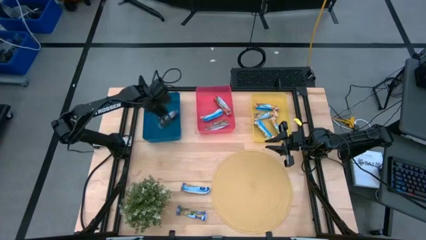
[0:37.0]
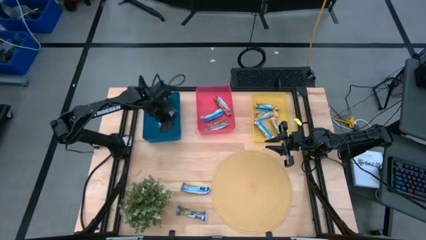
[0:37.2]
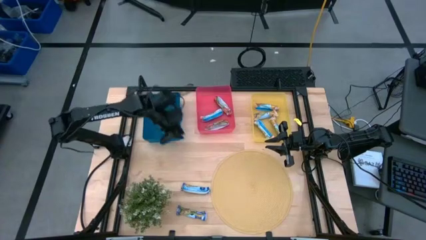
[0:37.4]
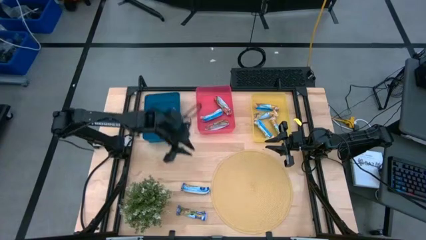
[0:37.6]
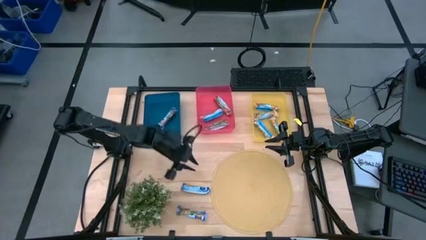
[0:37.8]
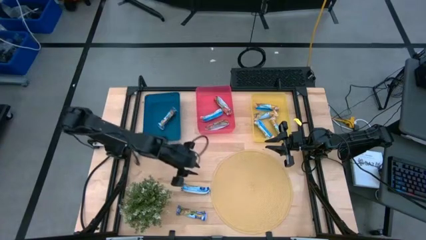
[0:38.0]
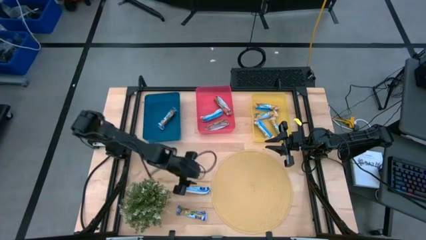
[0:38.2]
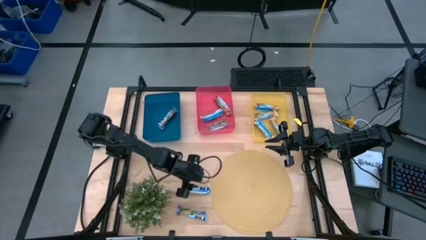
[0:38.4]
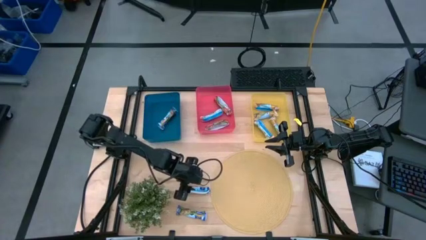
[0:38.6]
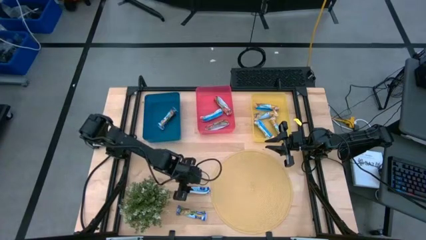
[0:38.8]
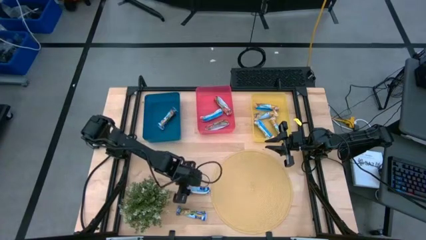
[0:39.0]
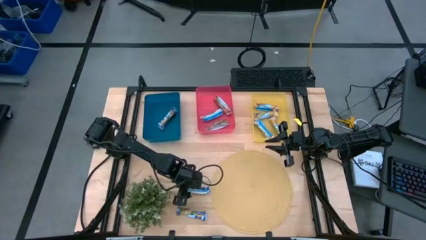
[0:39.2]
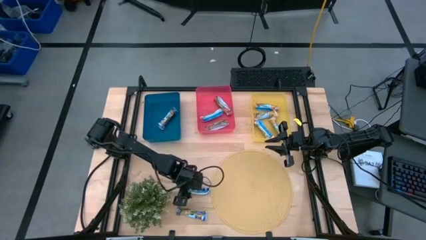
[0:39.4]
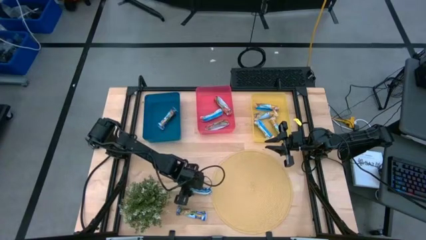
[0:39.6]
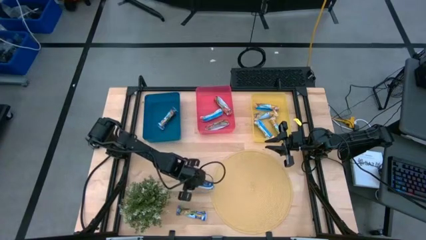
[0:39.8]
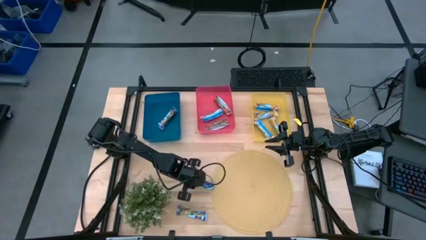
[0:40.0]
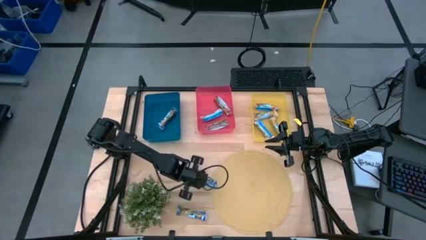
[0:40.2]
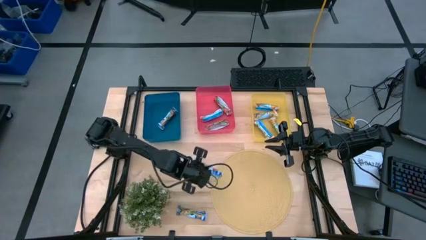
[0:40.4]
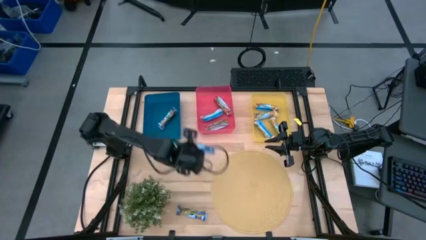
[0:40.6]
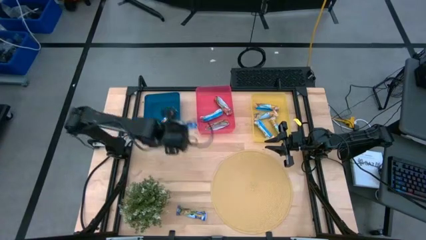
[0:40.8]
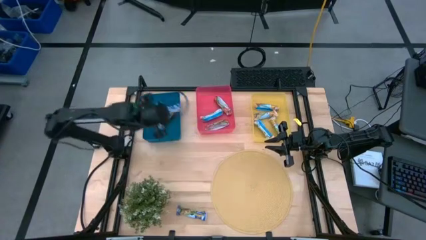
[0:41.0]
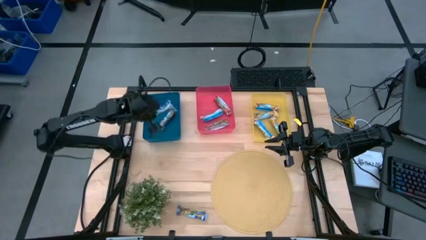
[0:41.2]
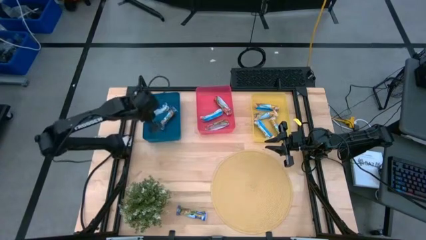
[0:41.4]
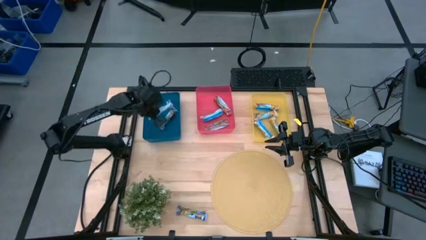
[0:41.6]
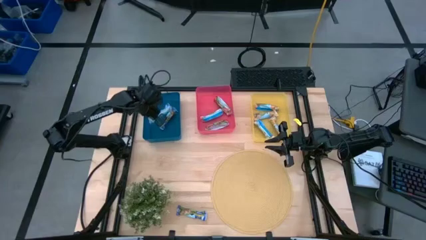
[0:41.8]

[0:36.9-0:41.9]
Task: Pick and place Granola Bars by type
Put the blue granola bar into the blue bin

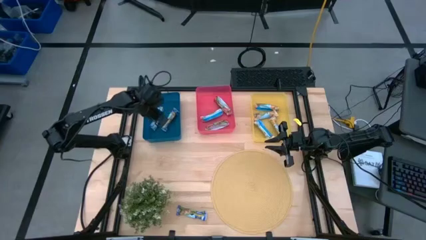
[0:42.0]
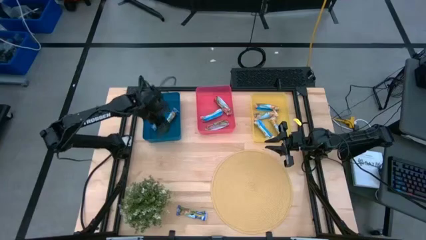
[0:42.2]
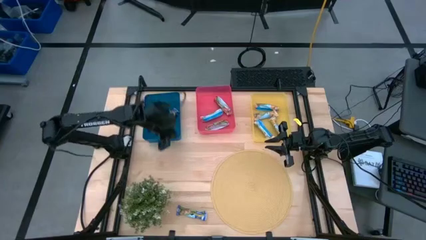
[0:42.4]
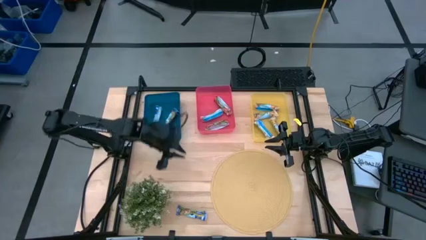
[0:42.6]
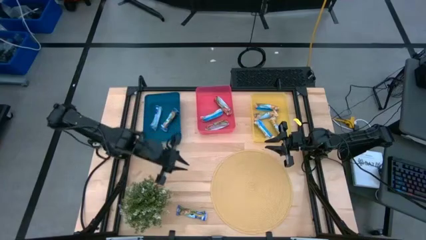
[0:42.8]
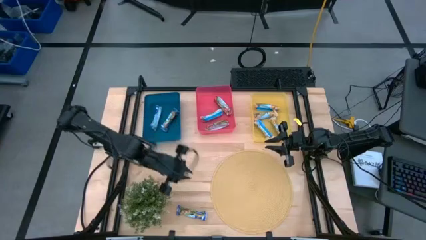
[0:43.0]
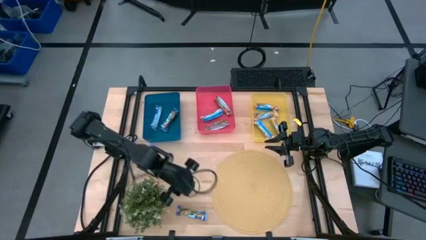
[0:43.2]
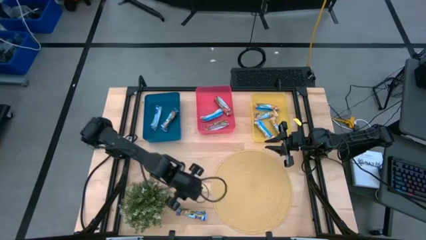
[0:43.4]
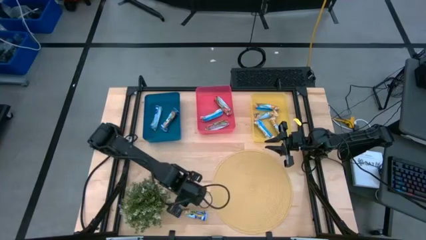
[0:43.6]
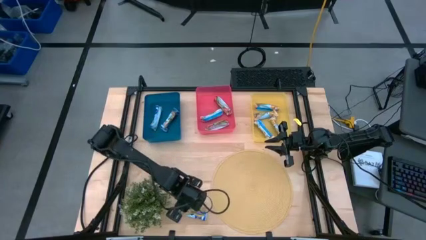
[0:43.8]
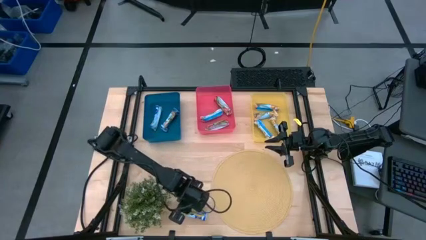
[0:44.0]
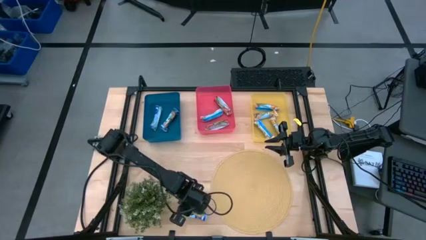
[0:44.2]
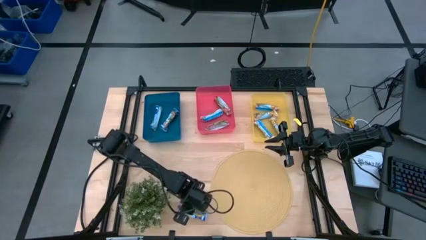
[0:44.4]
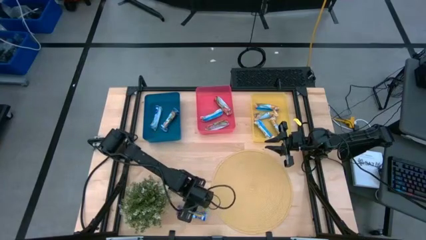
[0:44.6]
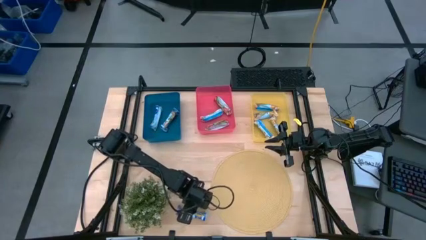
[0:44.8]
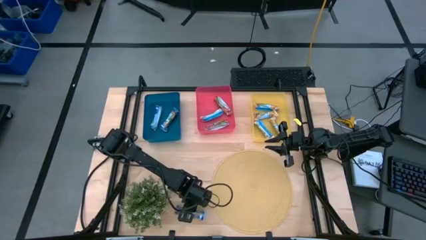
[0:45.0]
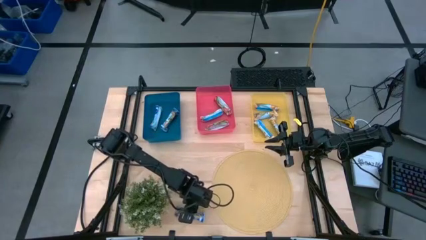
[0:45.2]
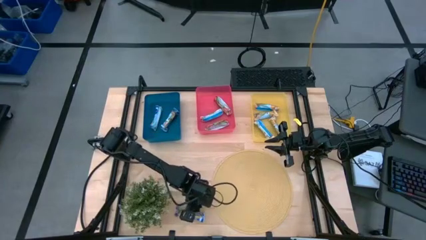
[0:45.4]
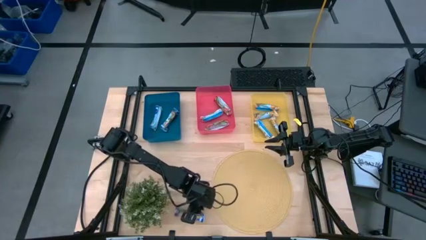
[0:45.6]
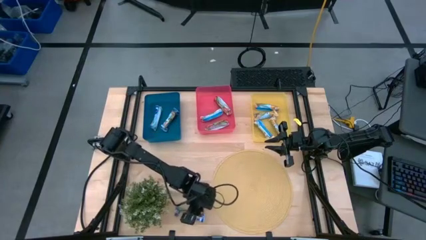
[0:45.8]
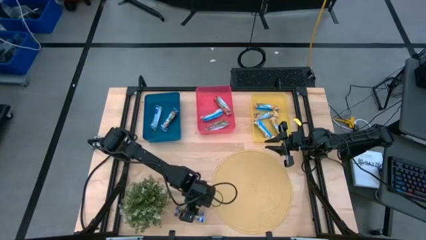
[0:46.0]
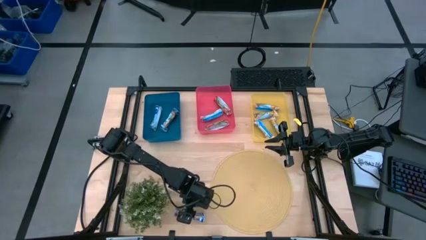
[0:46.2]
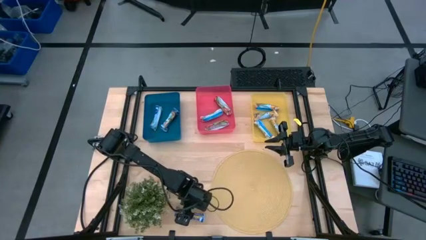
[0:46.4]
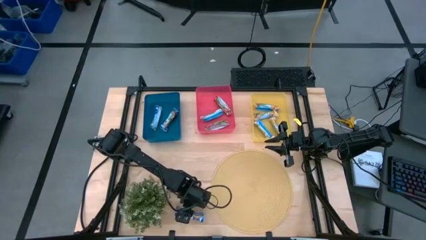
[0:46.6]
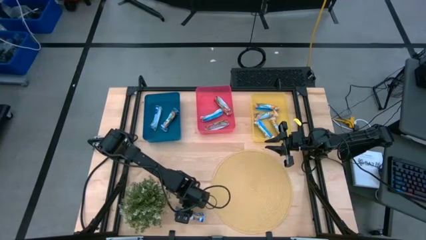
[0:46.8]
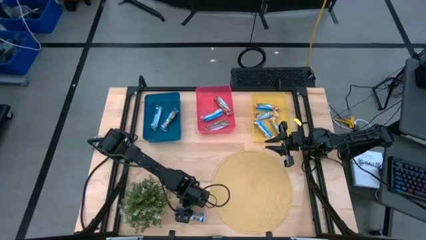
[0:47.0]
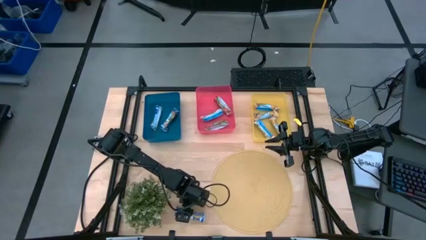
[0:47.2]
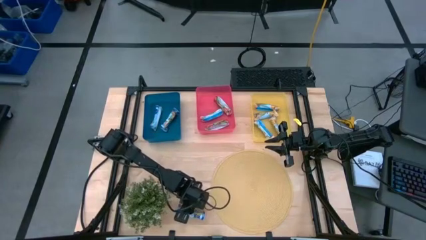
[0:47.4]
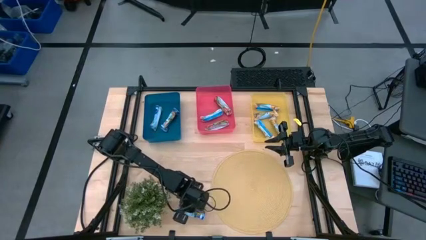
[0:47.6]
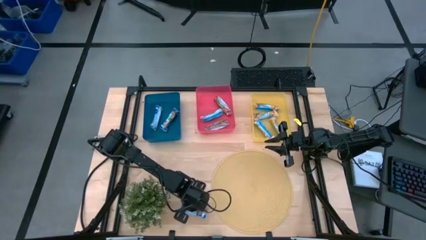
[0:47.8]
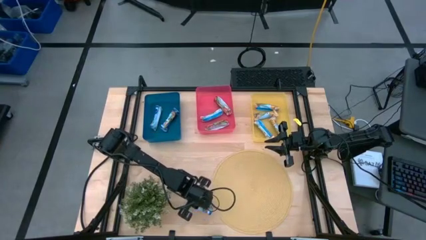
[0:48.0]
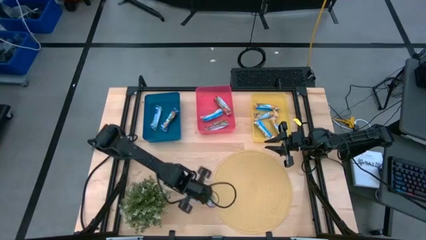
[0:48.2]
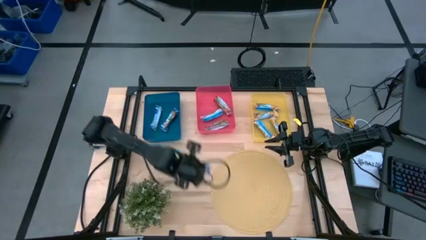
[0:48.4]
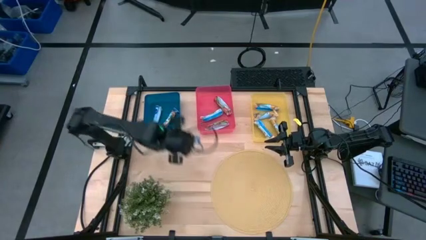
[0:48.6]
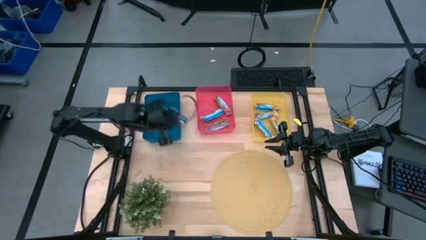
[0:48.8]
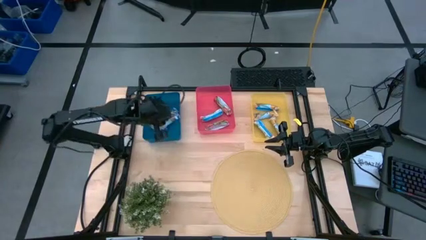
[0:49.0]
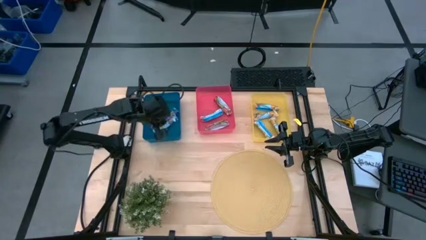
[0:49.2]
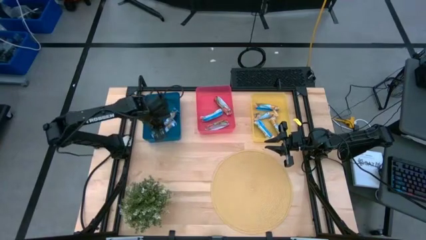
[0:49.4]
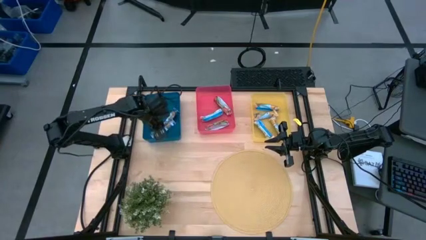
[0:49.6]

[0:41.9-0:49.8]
Put the blue granola bar into the blue bin

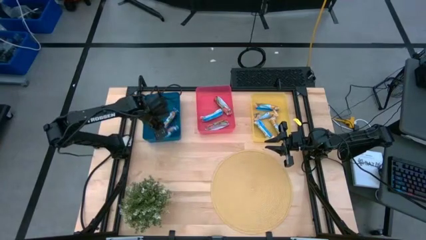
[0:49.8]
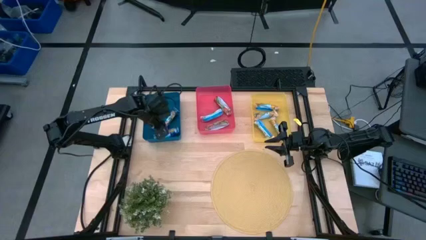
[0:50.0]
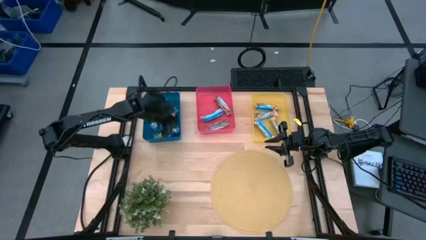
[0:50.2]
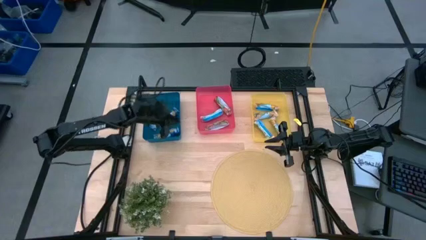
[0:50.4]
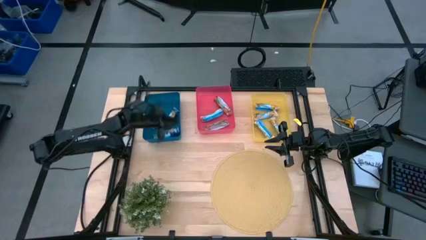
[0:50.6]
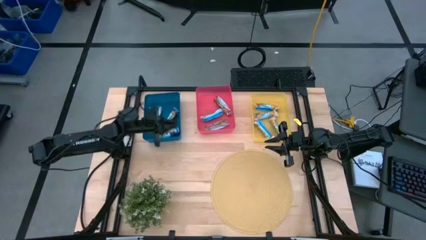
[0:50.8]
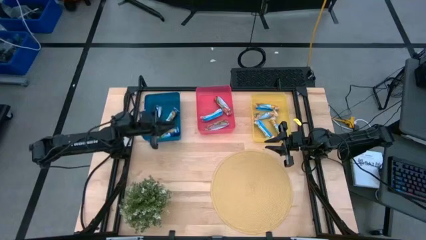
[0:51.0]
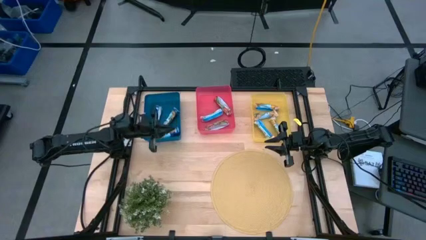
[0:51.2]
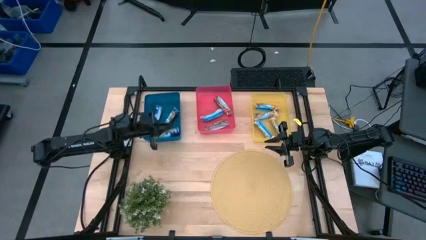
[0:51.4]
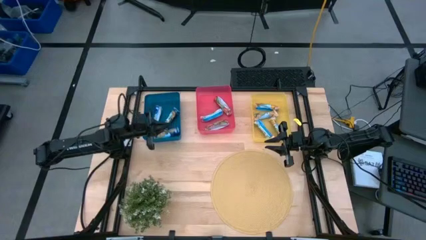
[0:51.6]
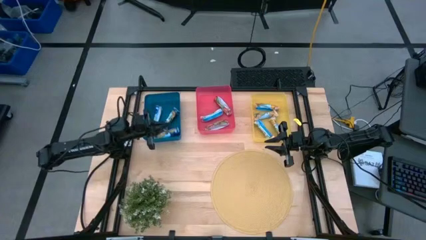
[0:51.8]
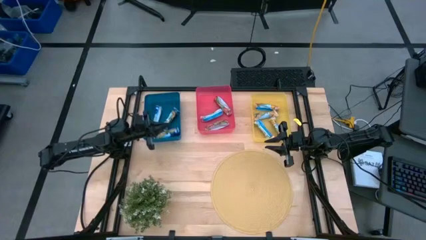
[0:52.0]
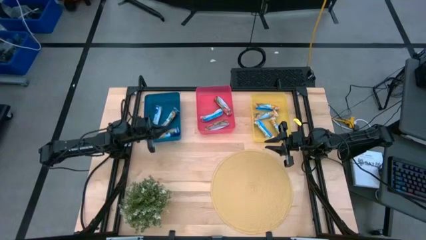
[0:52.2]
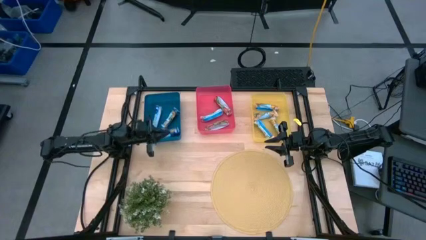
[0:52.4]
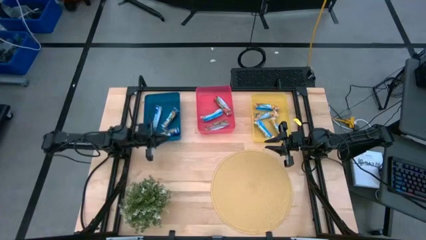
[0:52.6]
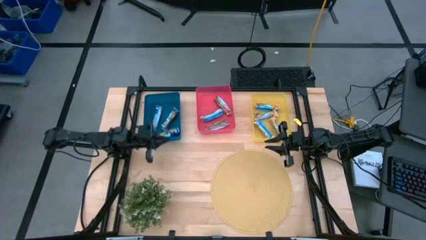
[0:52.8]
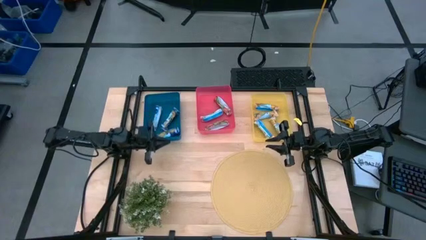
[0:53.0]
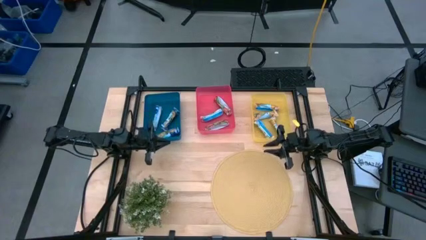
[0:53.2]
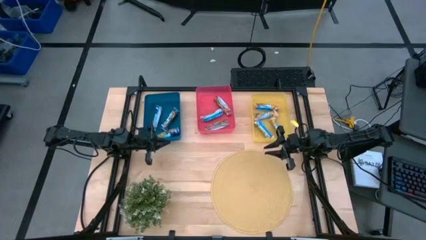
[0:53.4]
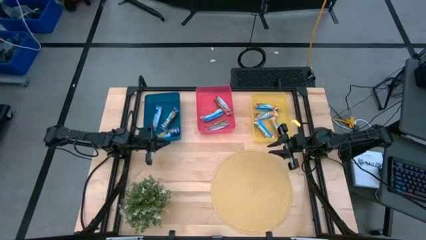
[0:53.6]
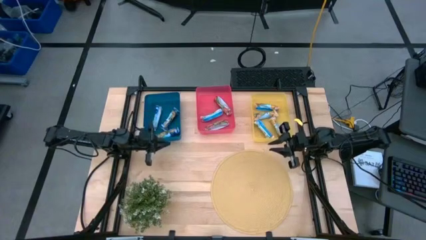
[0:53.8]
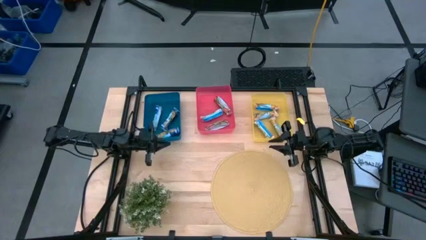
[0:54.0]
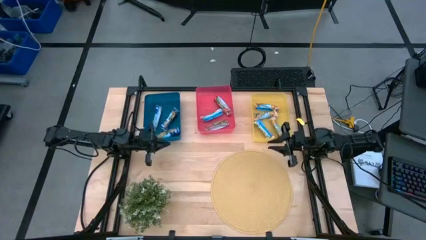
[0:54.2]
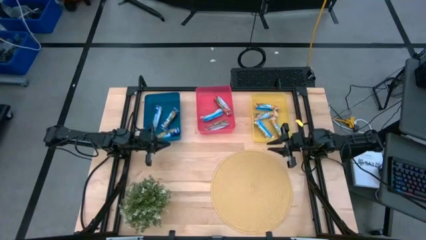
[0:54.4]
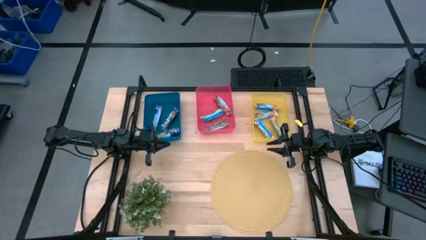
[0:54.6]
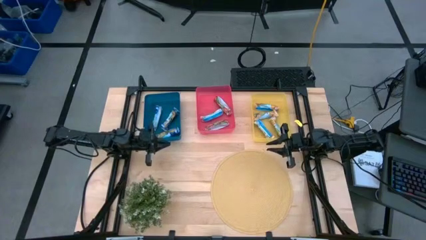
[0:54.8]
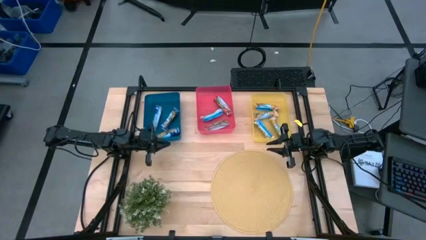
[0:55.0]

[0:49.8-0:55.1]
Return to Home Position
